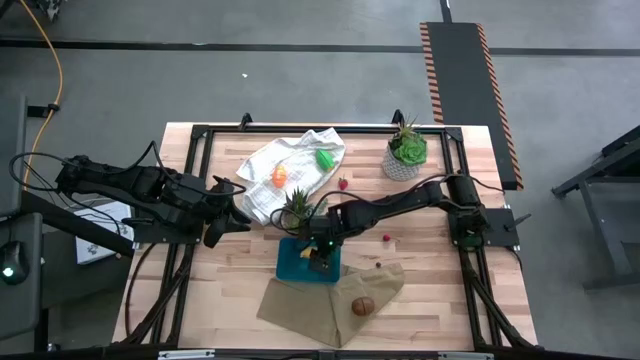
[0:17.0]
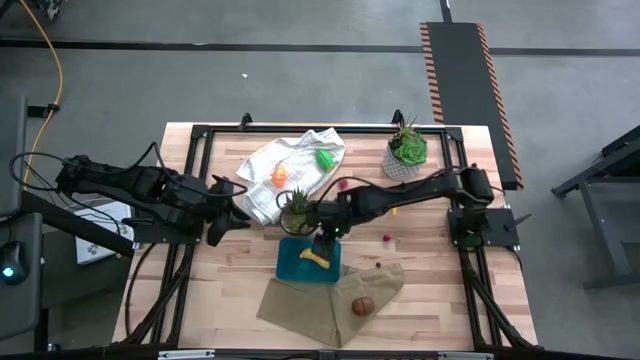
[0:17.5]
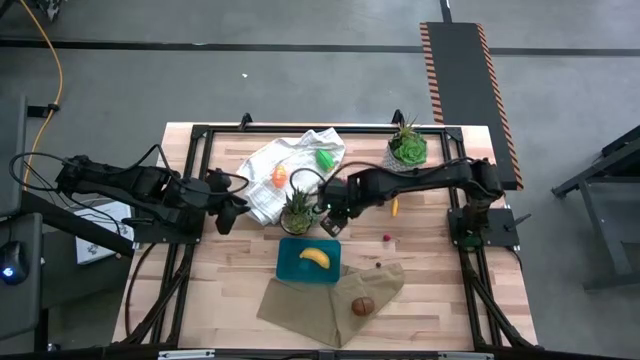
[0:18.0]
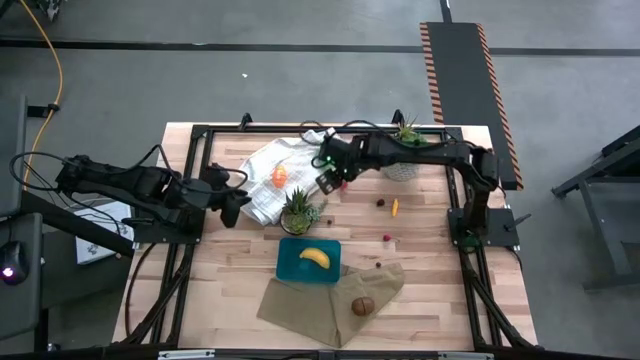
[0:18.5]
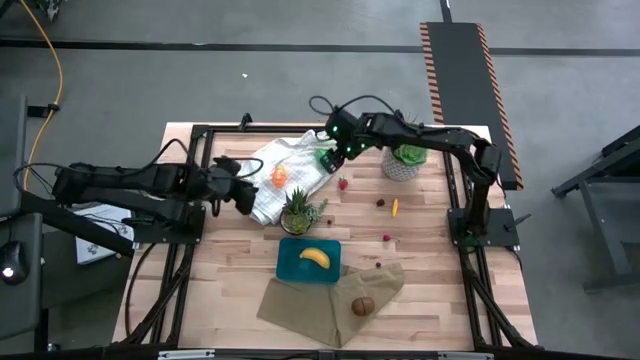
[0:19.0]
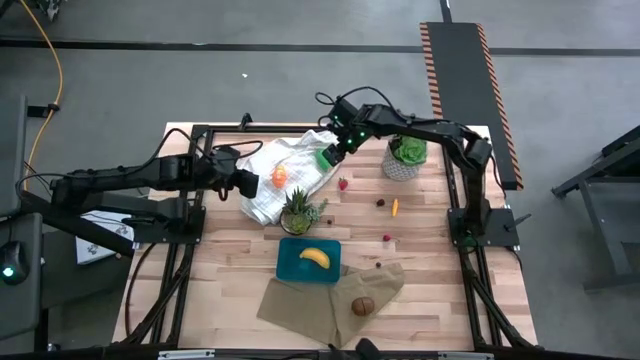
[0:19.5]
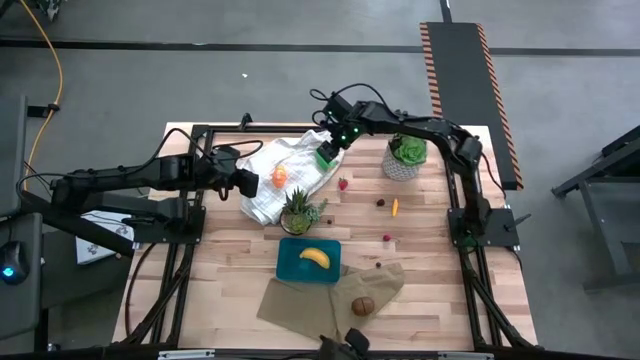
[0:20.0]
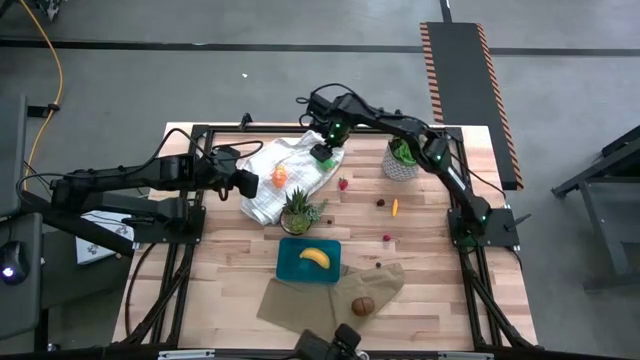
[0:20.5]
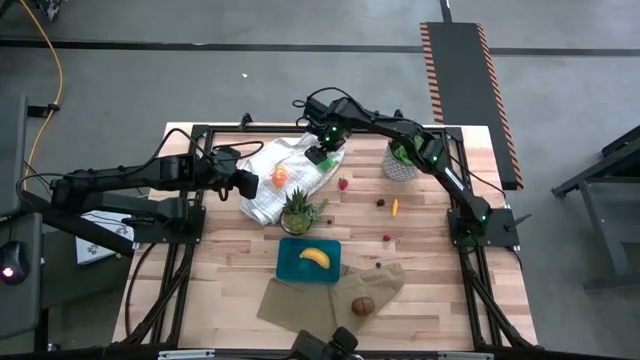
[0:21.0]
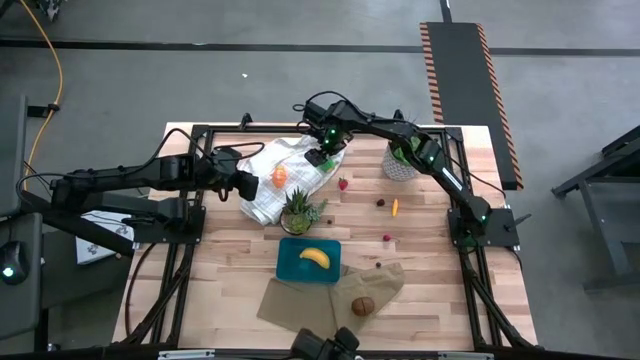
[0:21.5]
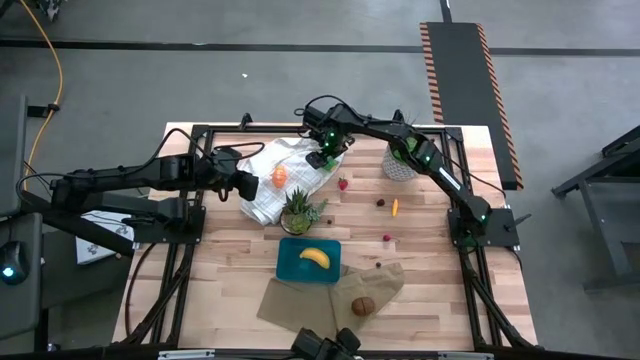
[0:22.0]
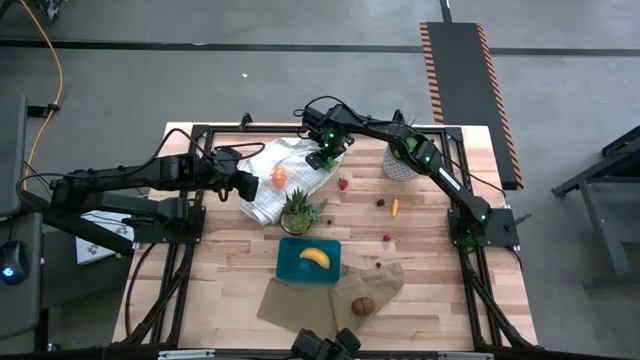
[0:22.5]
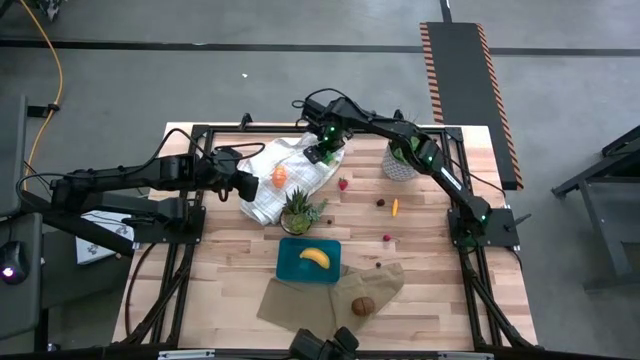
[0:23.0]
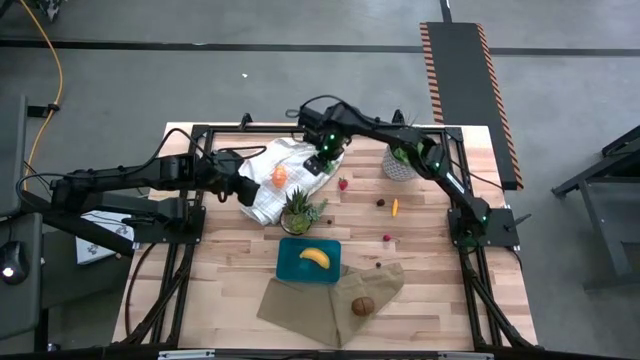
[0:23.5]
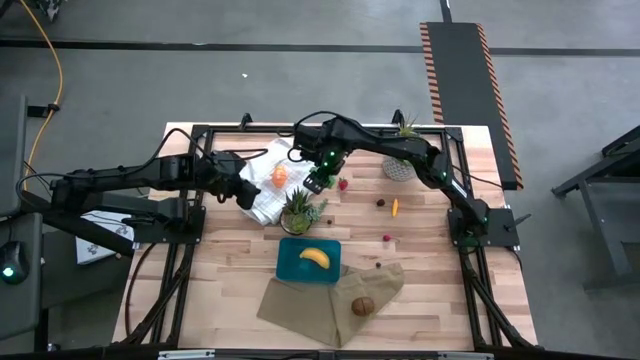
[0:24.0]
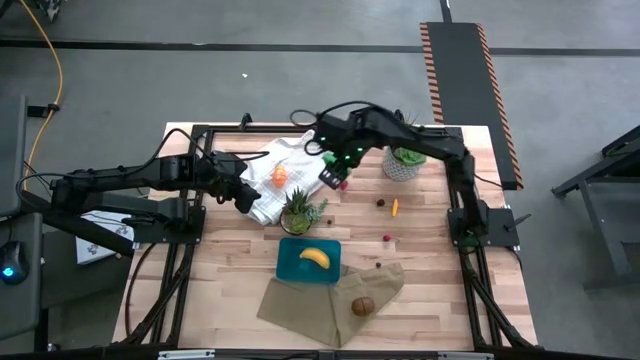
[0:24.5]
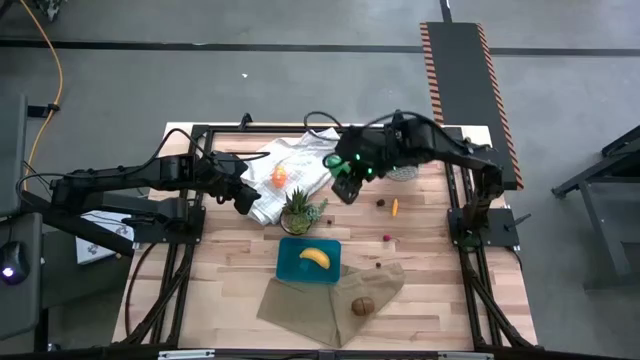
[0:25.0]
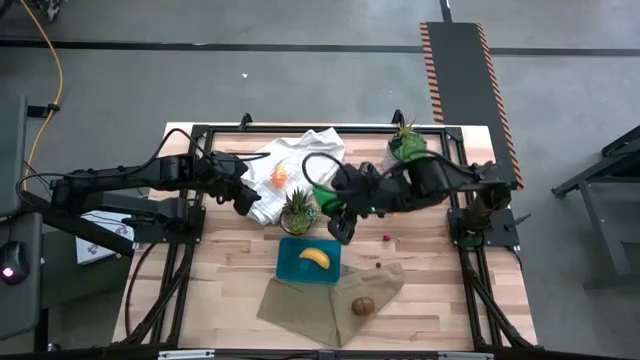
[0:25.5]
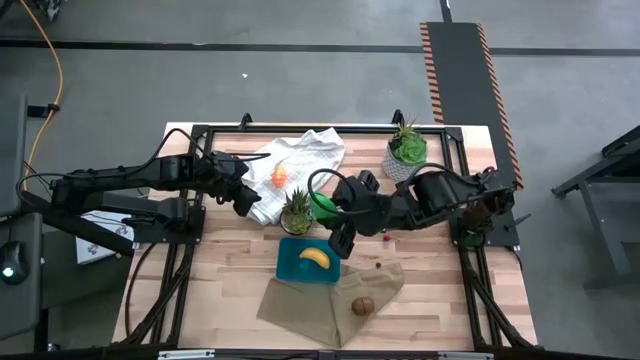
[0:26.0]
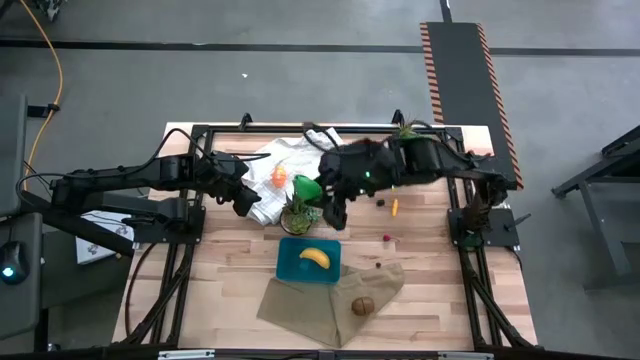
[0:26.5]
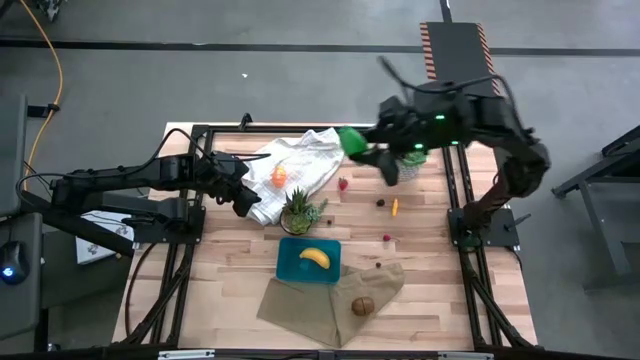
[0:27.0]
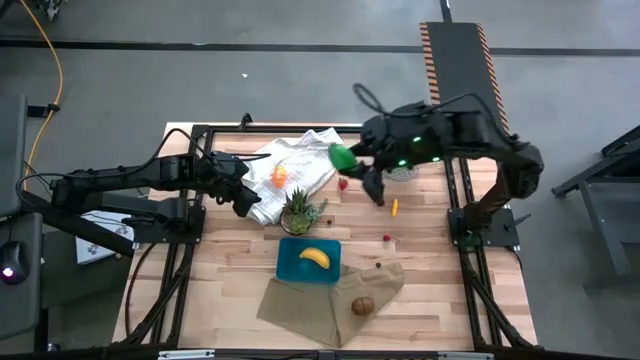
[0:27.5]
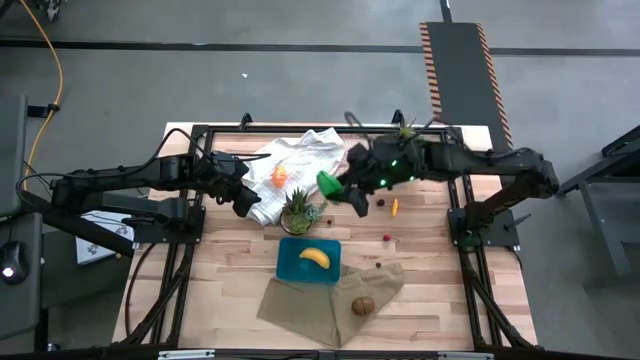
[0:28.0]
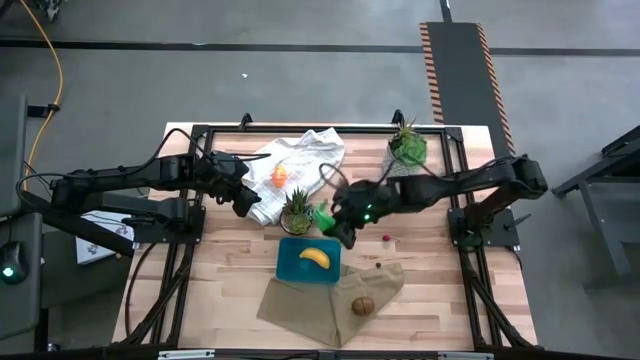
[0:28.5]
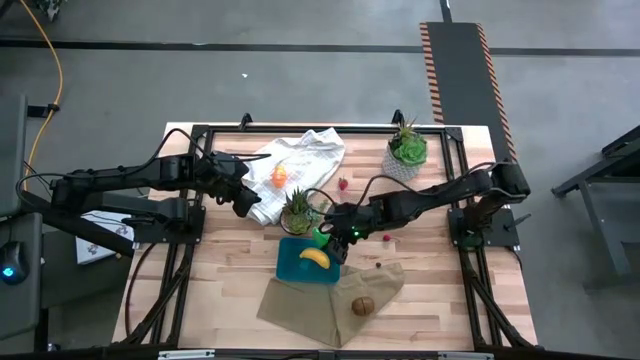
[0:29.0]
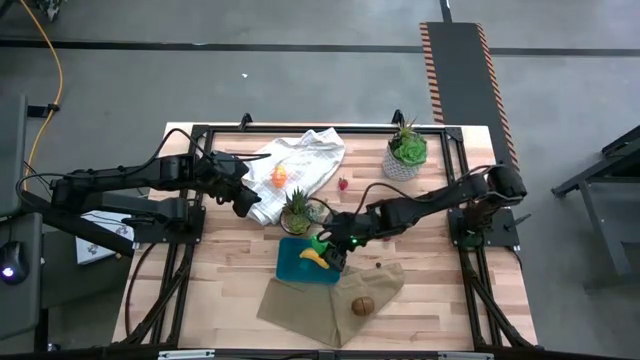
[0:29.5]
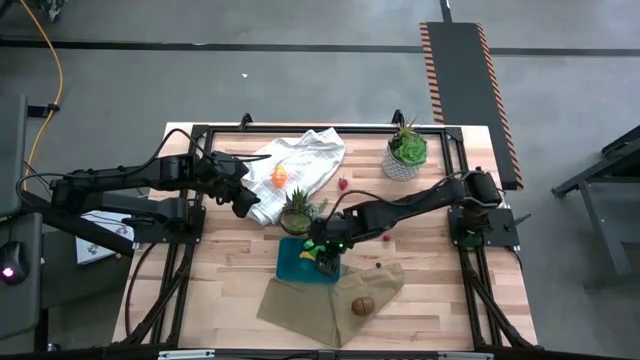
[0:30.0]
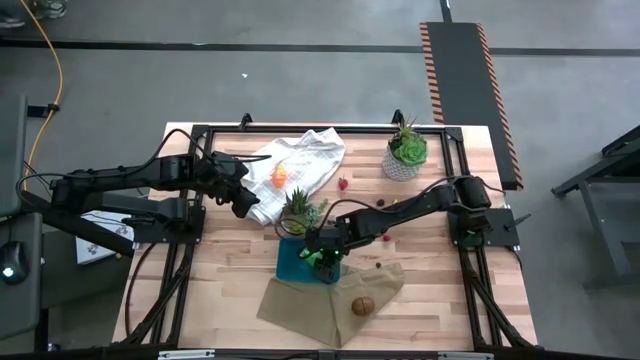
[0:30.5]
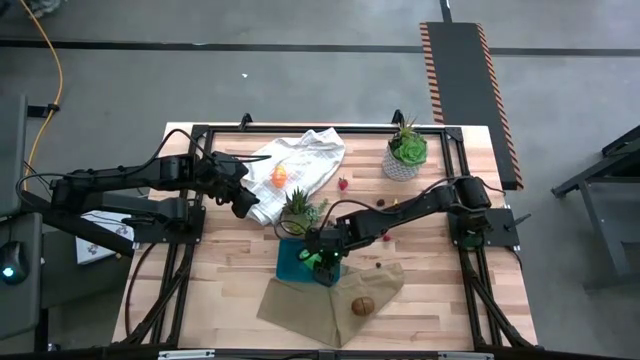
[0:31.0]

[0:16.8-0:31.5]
Task: Pick and placing Produce into tupperware
Put the large corn into the blue bin

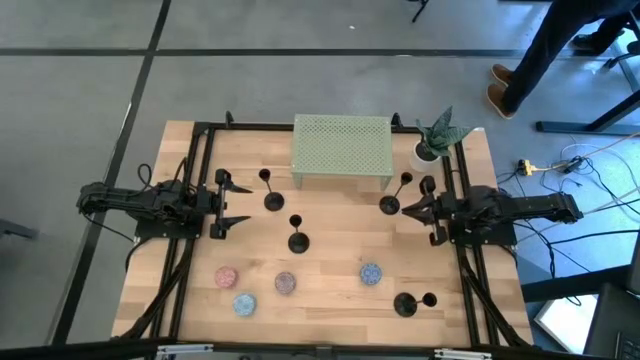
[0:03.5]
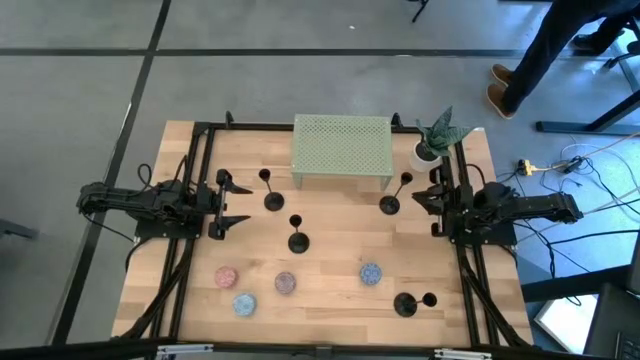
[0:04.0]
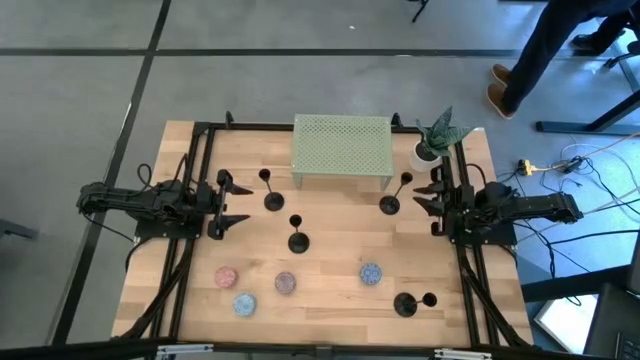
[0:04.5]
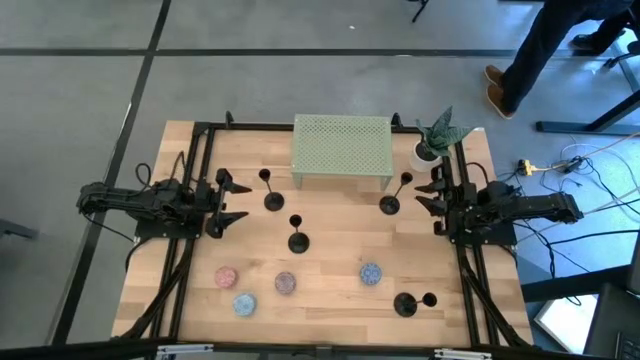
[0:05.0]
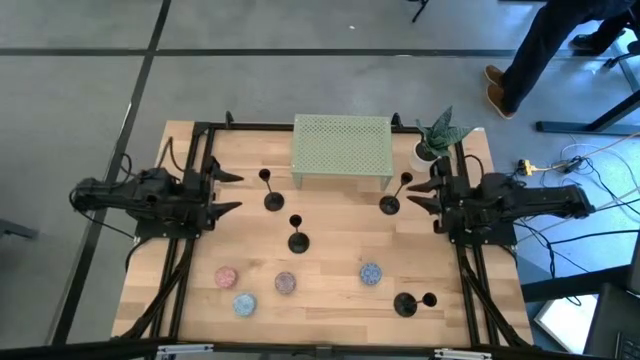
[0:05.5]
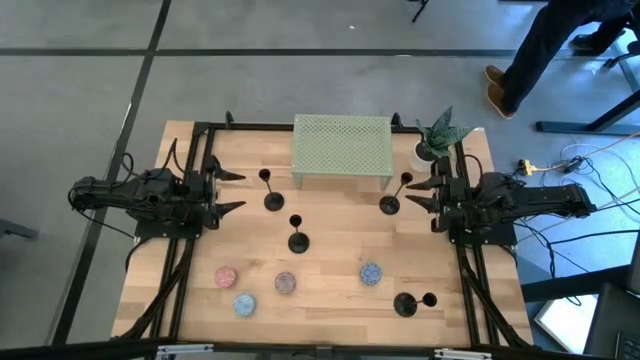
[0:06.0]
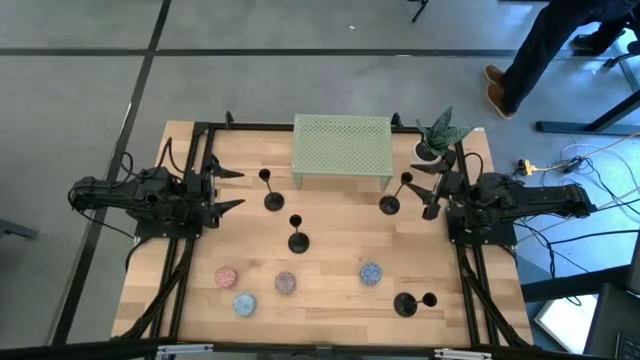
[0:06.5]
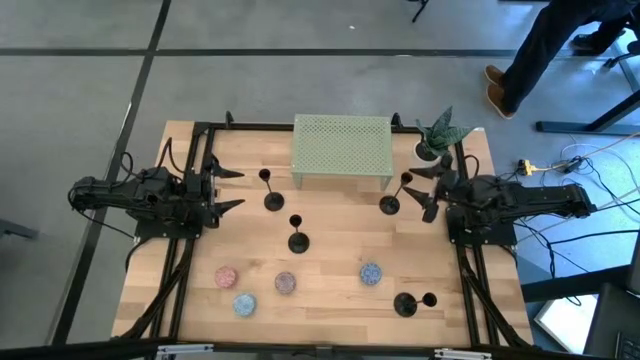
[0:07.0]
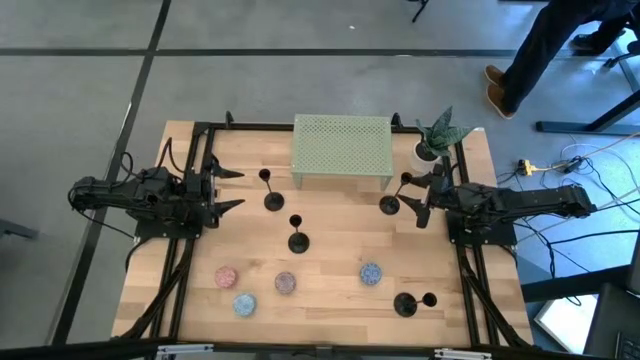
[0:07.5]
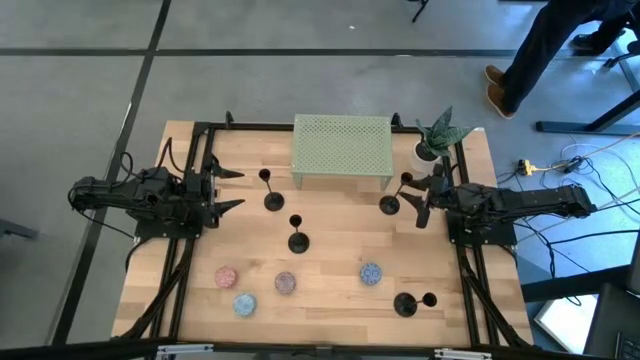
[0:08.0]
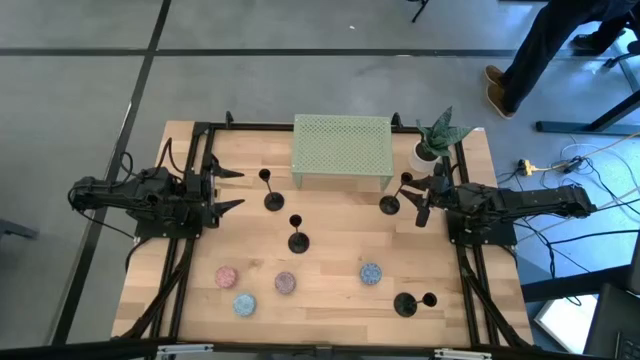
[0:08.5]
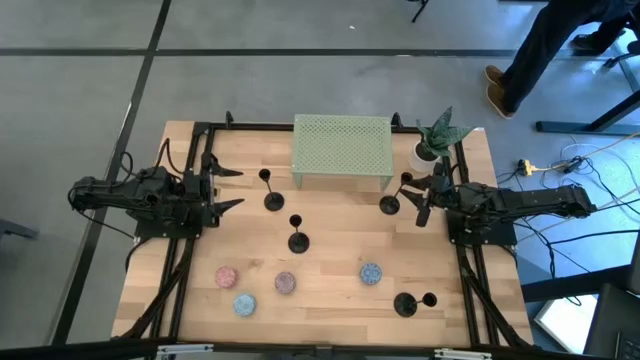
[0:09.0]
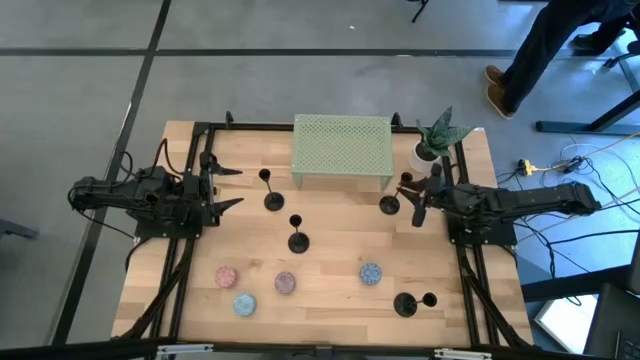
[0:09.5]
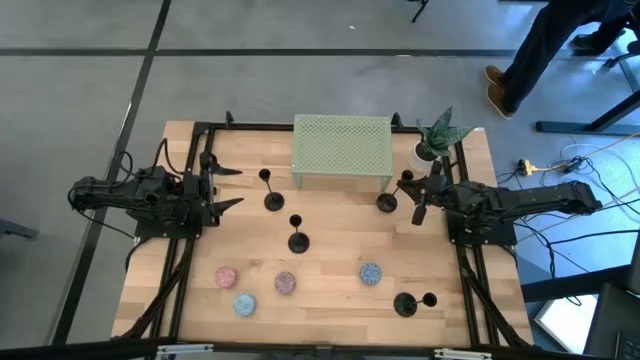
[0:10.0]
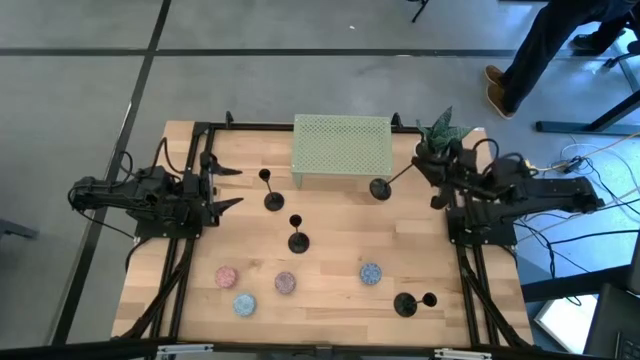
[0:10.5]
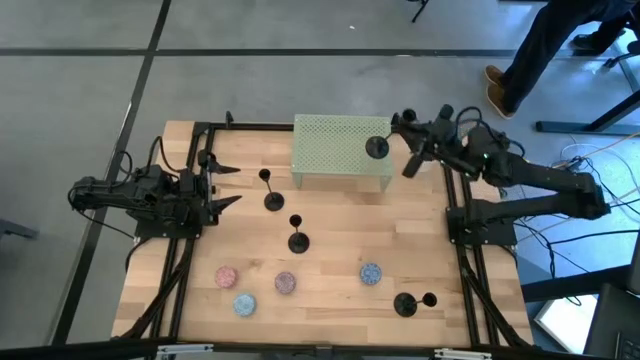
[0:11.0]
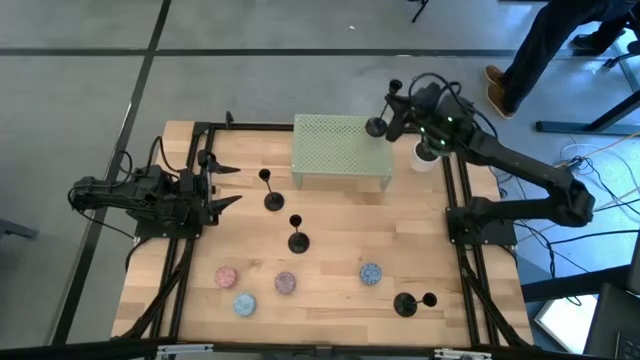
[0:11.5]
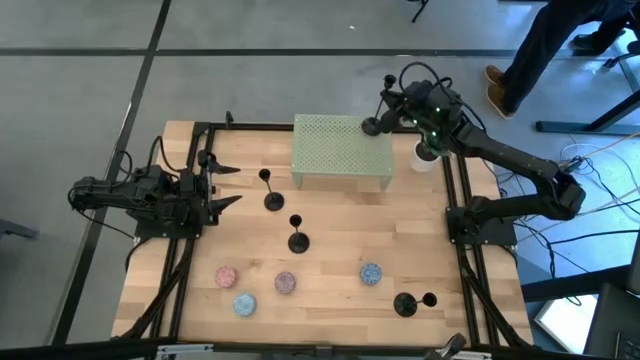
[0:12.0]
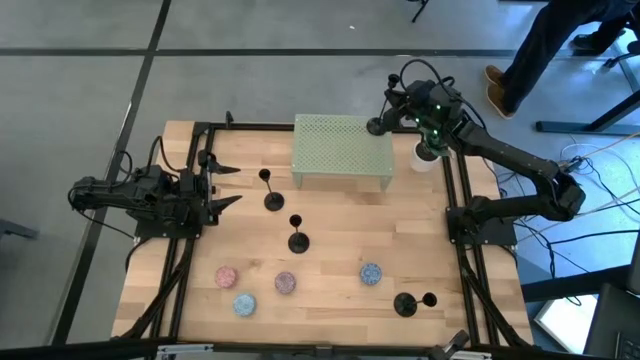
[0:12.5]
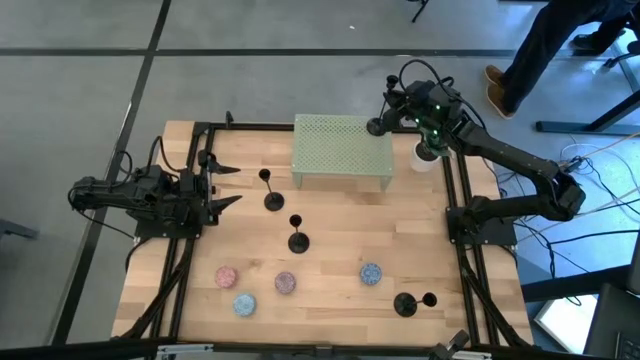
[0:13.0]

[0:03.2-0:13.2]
Task: Pick & Place candle stick holders
Put the black candle holder on the shelf
